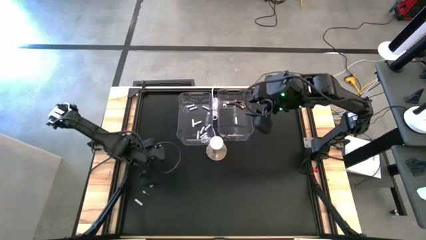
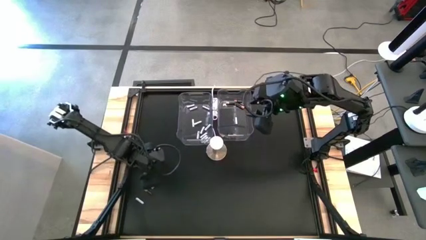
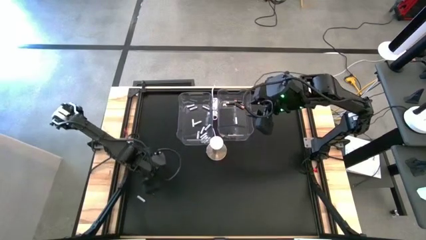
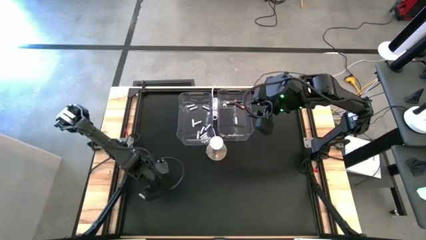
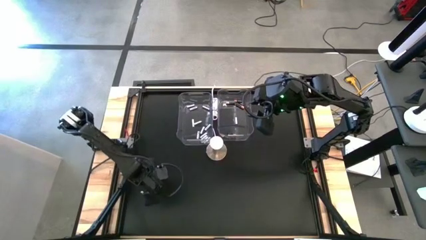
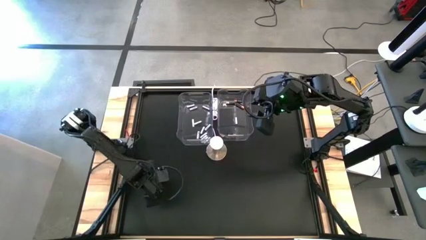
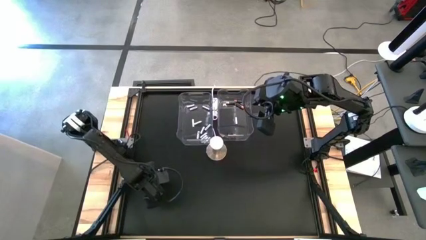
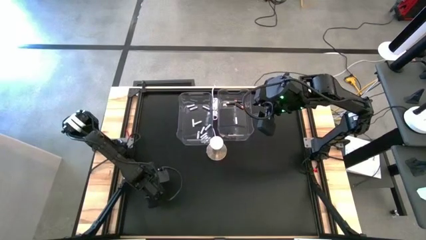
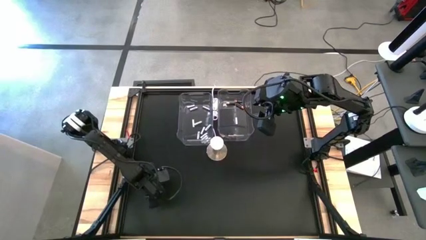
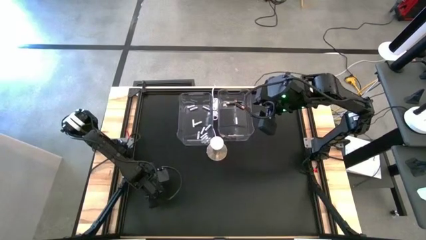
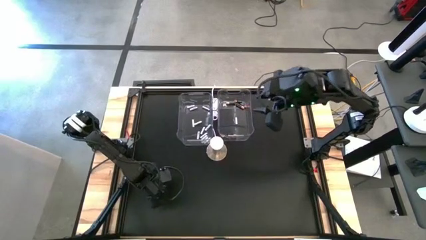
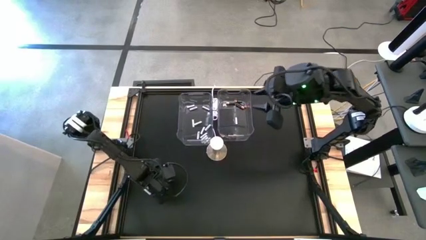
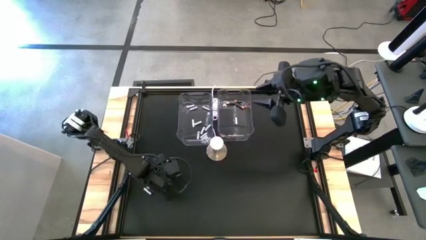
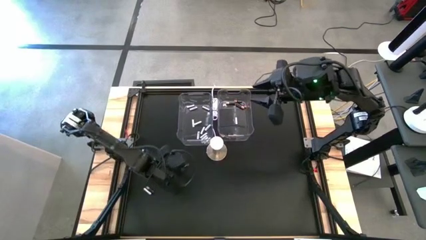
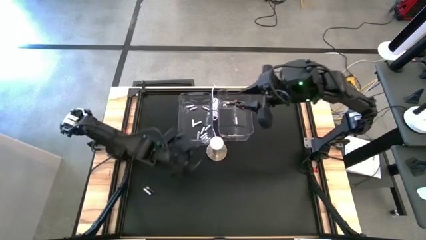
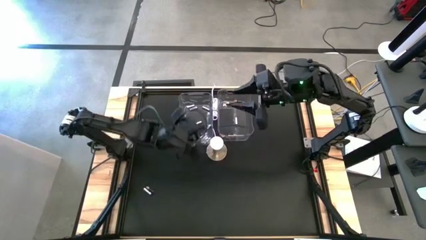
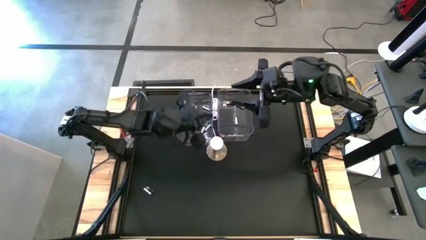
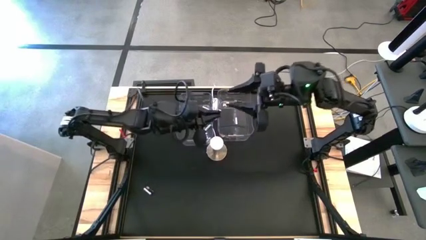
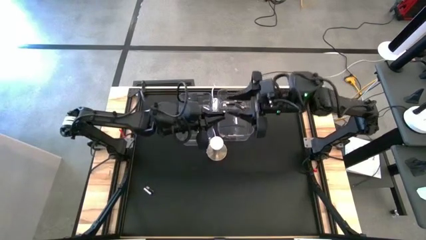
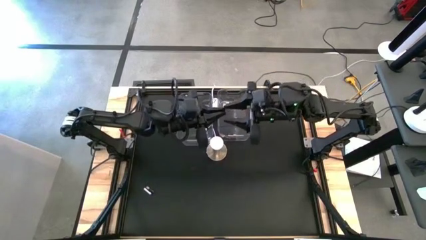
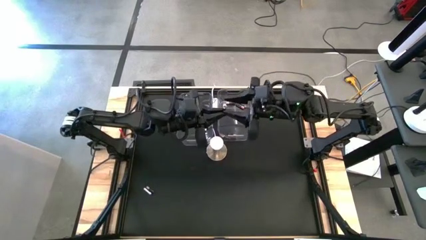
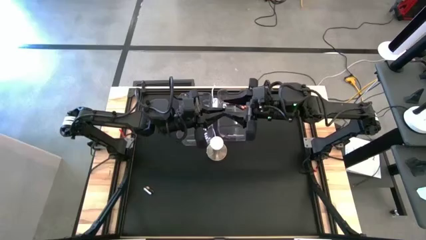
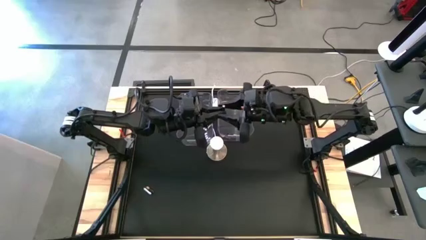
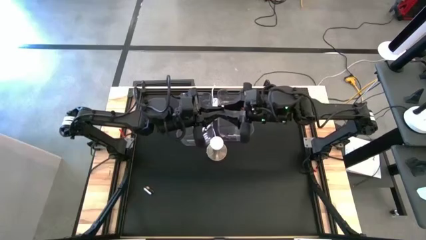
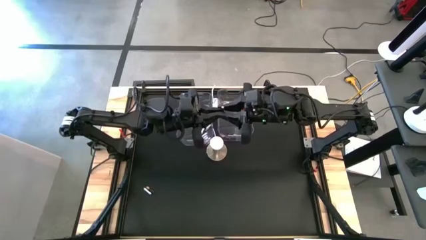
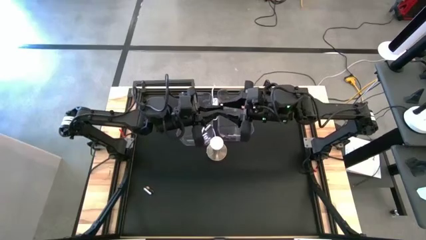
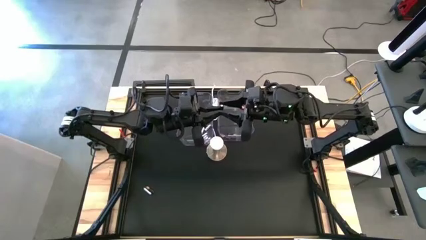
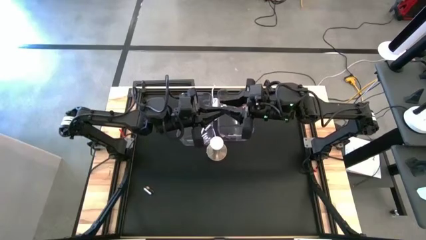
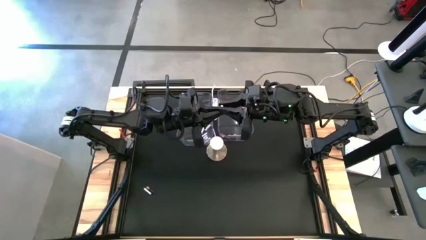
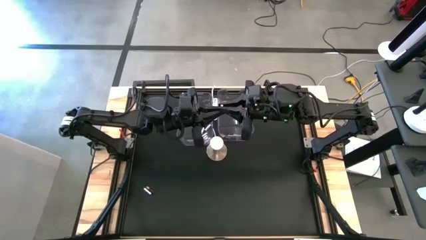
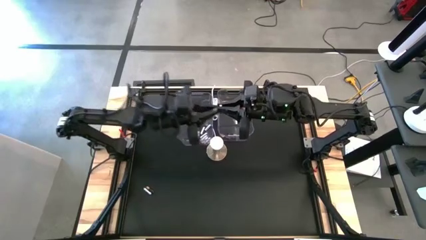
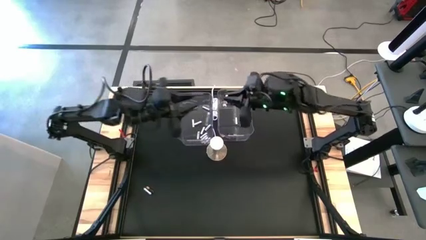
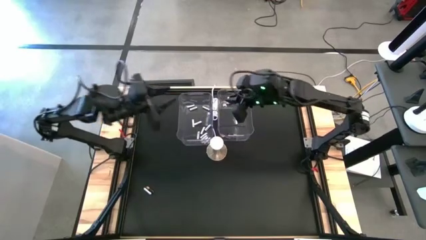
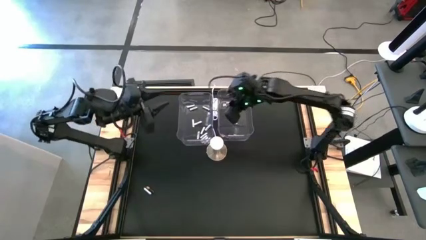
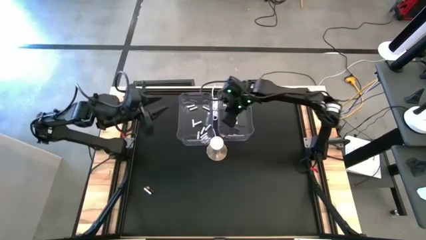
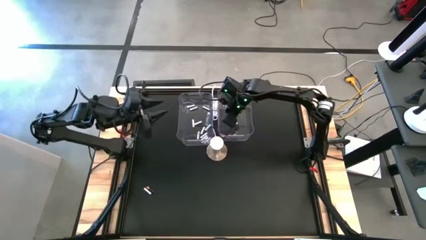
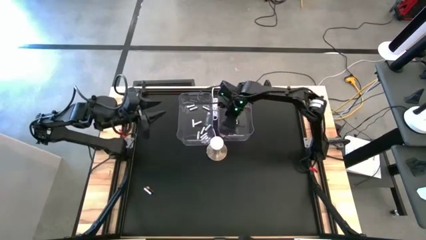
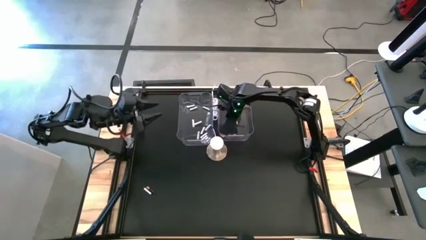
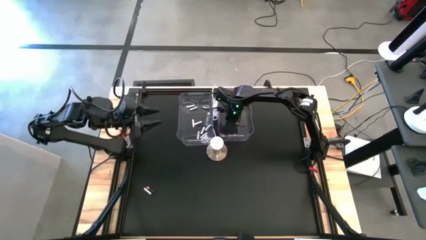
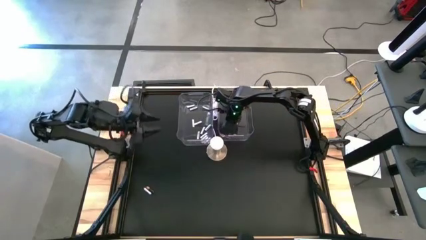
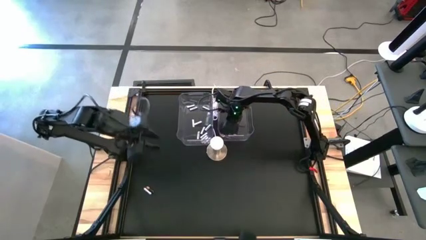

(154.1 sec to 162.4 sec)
Task: Sort batteries
Put the black battery into the right transparent bin

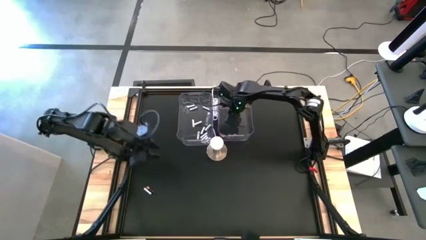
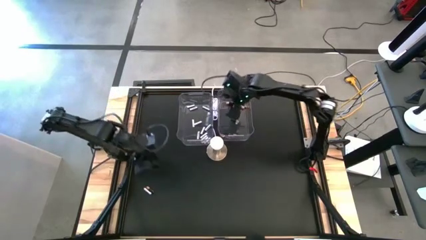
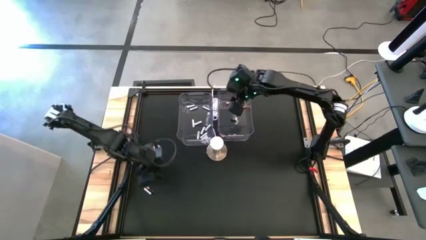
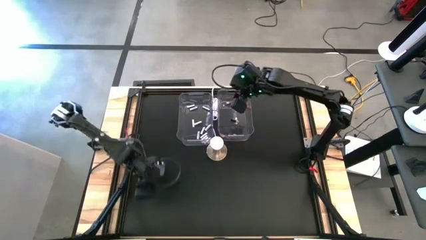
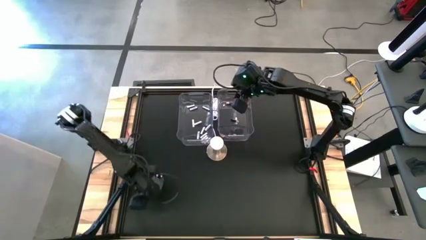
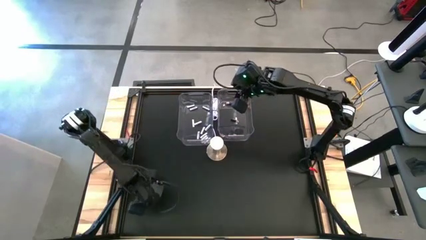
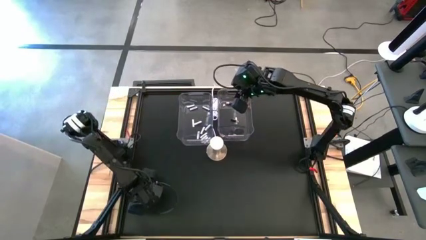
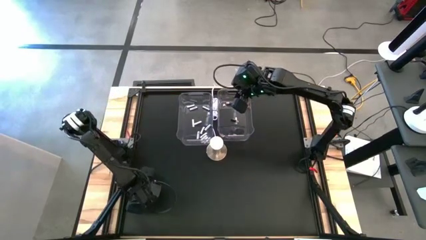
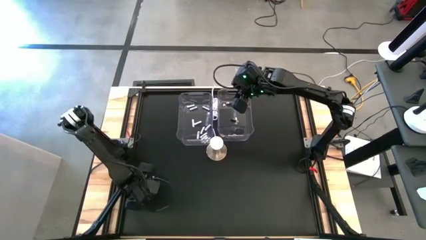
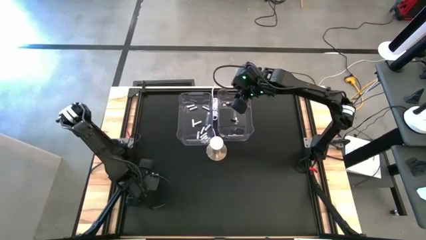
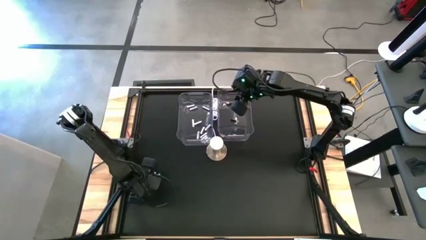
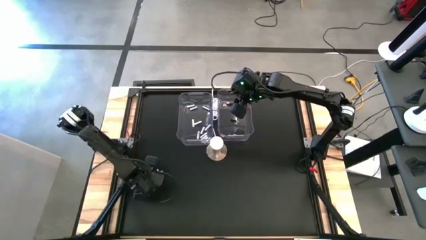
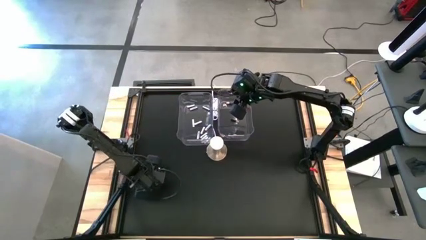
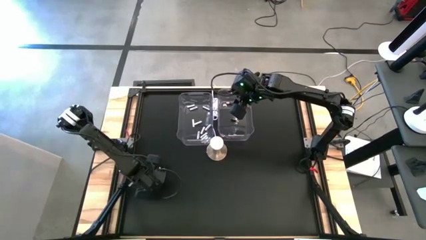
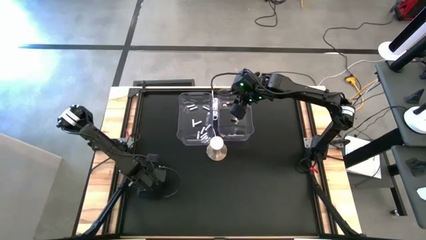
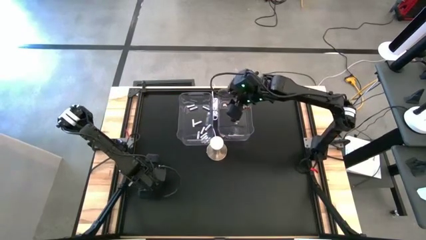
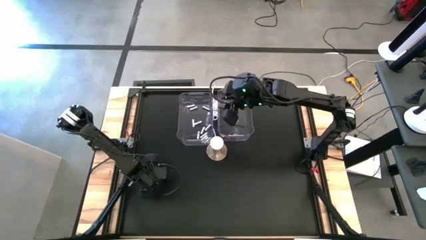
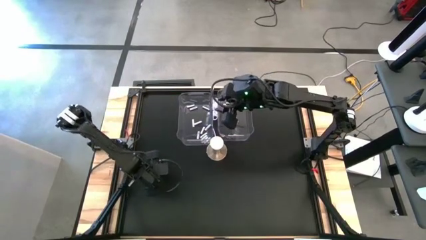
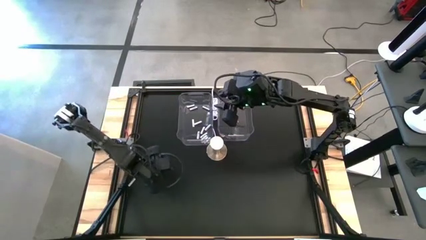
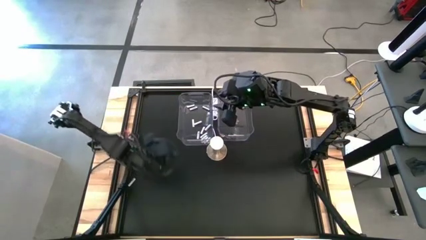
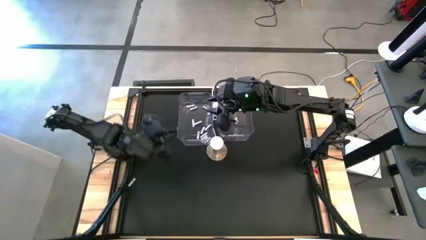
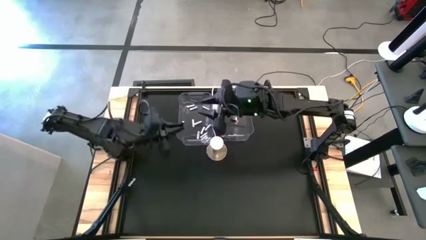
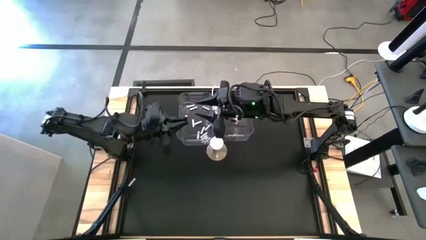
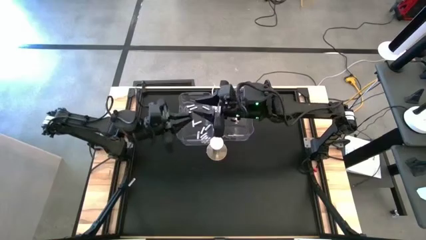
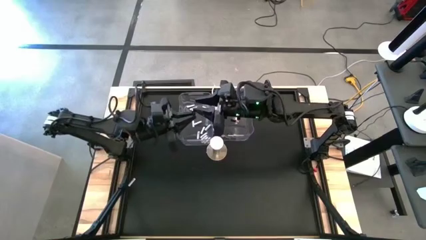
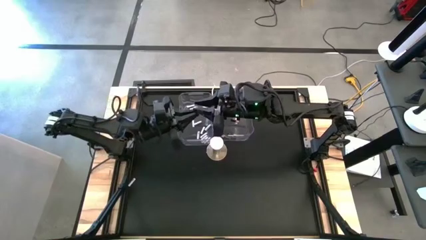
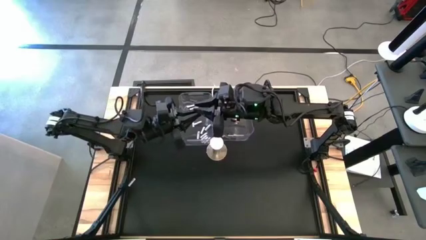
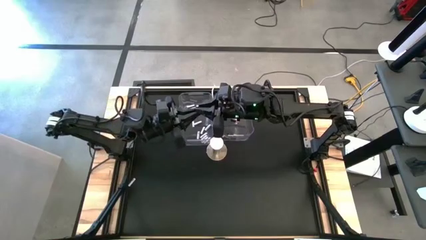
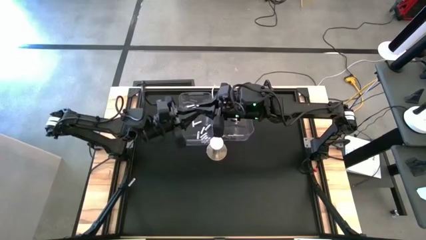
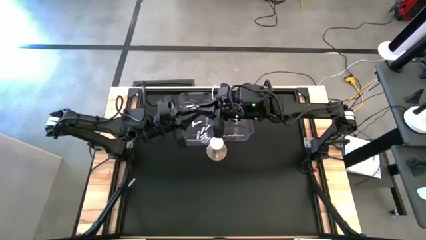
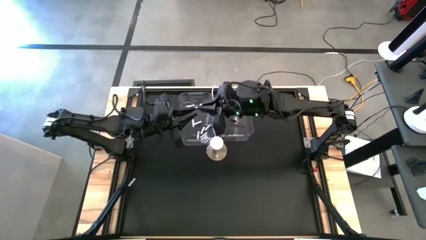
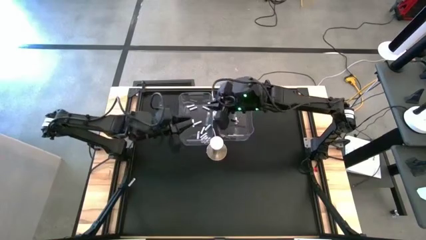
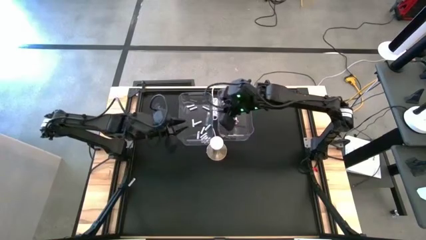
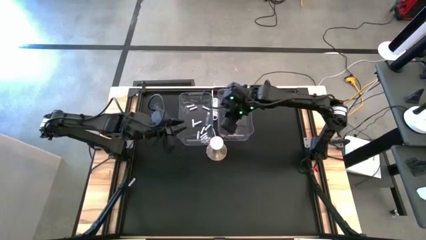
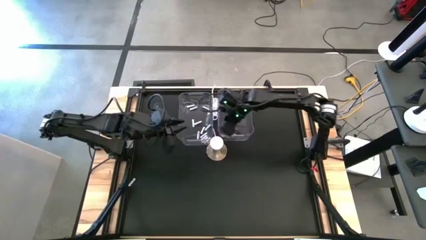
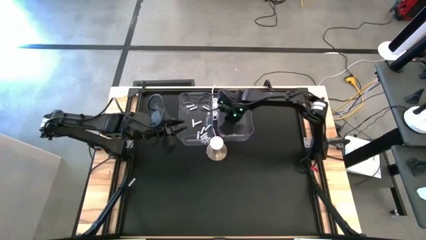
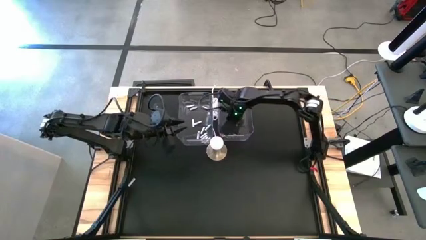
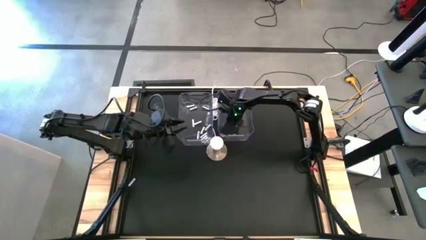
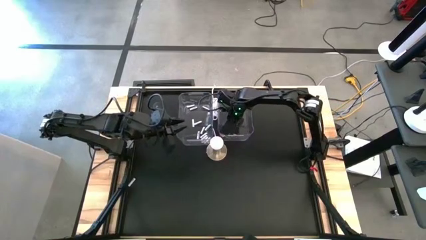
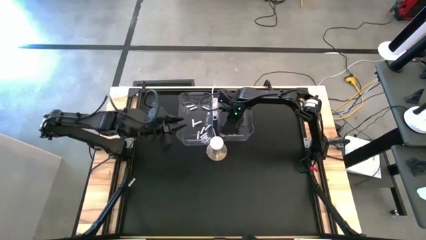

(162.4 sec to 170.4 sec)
Put the black battery into the right transparent bin
